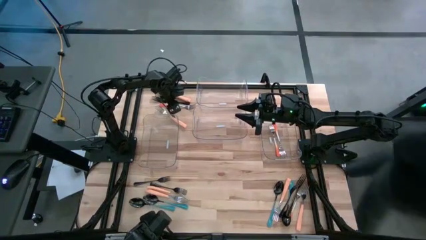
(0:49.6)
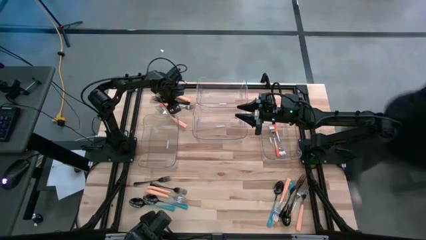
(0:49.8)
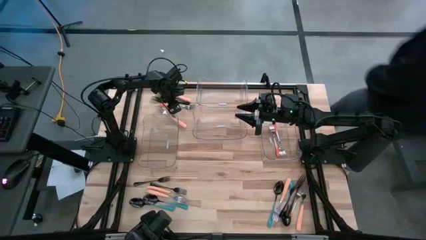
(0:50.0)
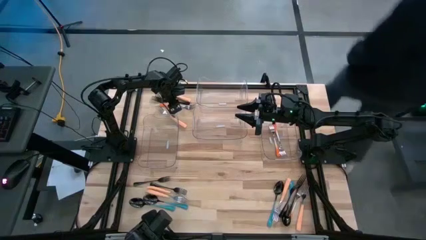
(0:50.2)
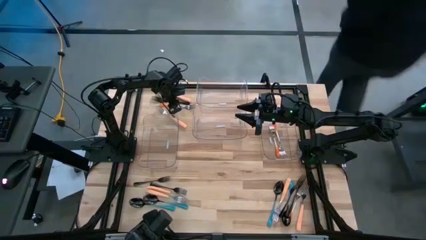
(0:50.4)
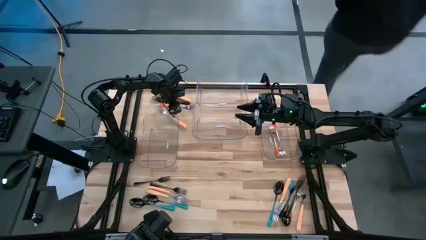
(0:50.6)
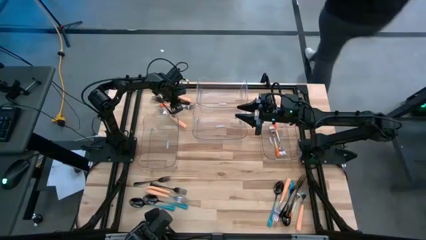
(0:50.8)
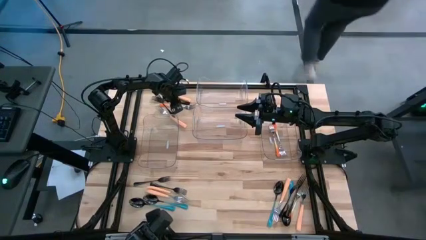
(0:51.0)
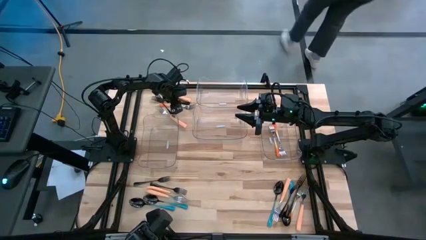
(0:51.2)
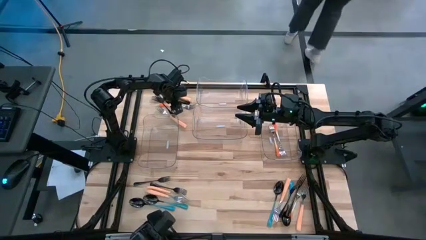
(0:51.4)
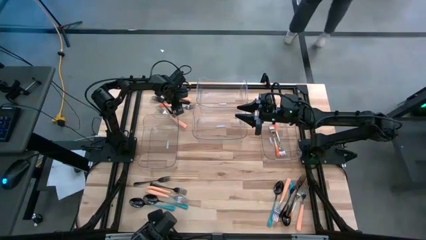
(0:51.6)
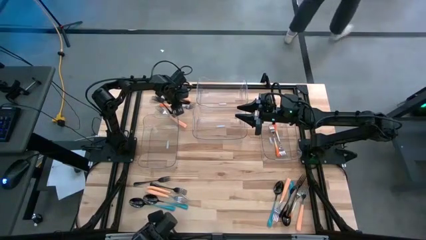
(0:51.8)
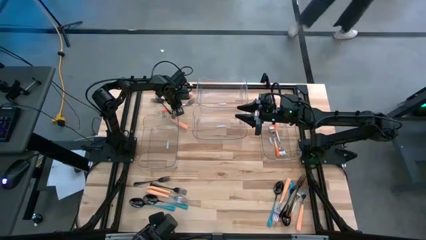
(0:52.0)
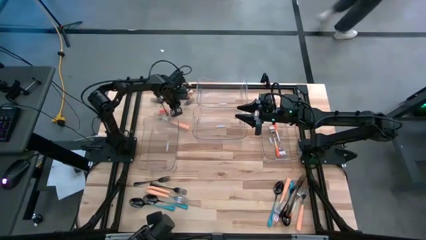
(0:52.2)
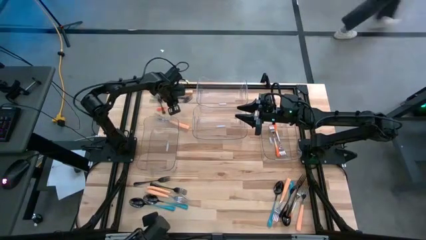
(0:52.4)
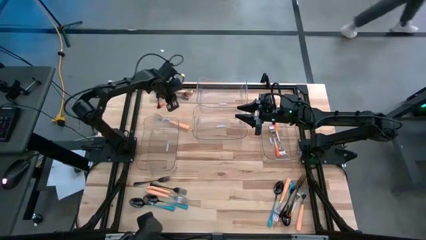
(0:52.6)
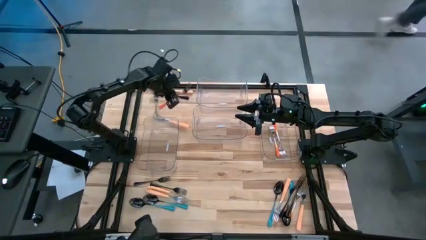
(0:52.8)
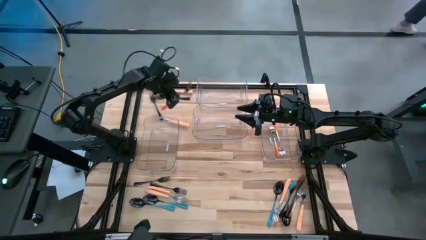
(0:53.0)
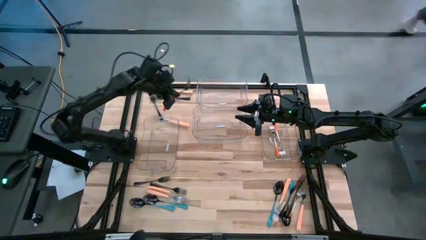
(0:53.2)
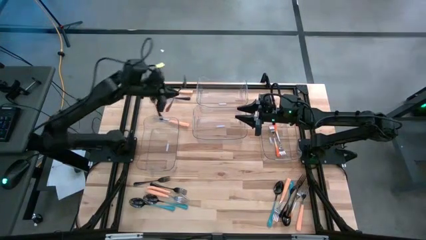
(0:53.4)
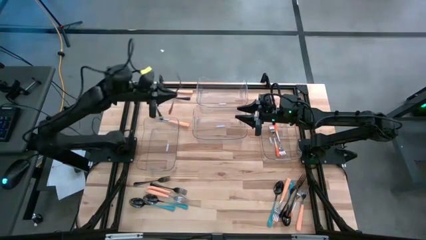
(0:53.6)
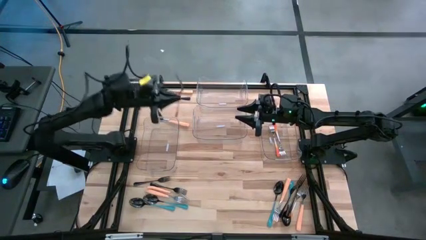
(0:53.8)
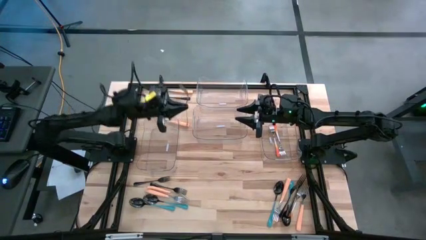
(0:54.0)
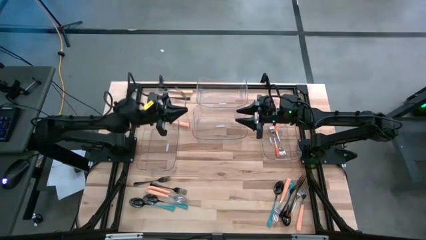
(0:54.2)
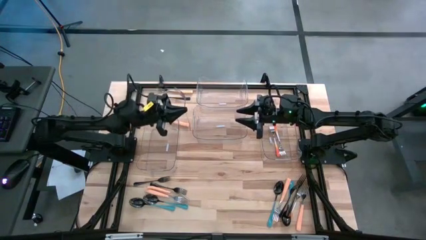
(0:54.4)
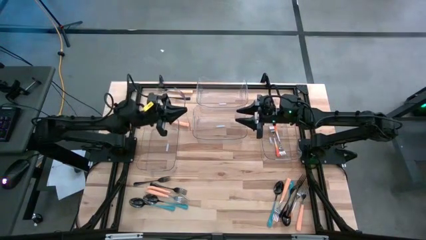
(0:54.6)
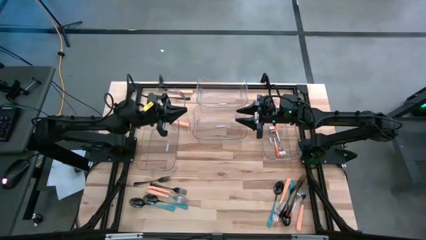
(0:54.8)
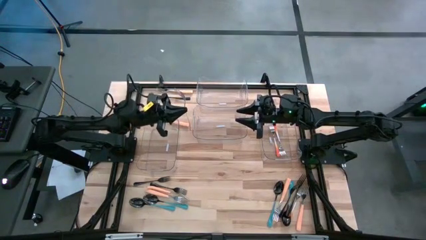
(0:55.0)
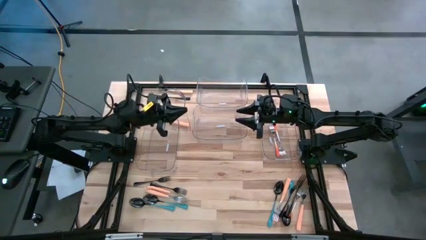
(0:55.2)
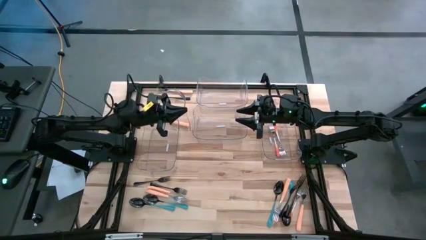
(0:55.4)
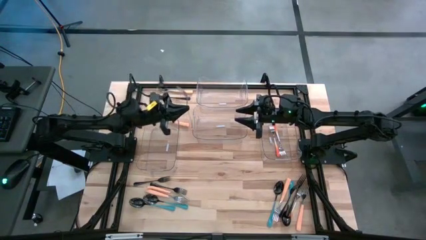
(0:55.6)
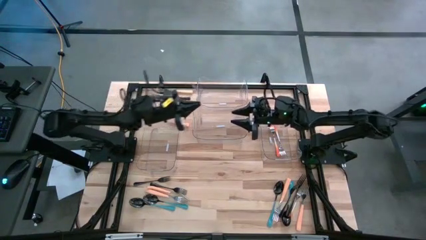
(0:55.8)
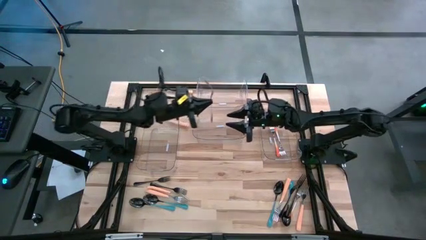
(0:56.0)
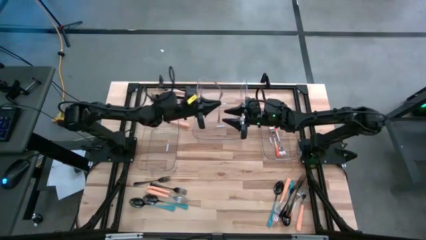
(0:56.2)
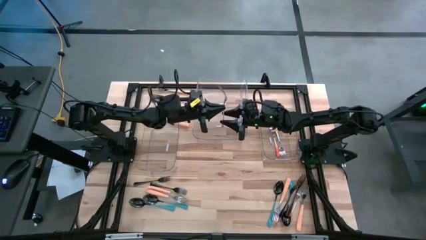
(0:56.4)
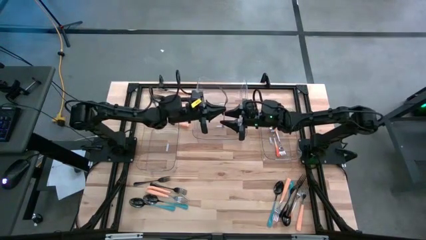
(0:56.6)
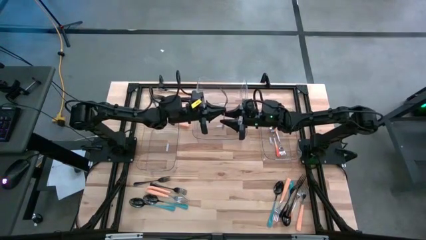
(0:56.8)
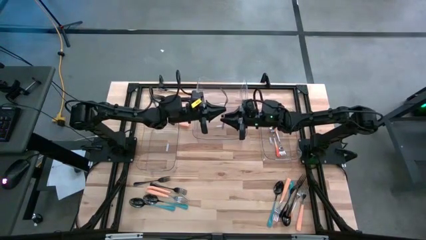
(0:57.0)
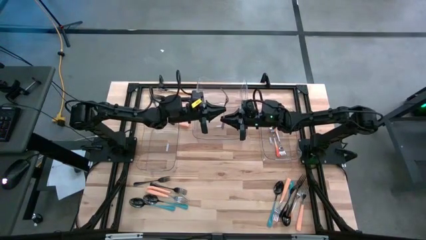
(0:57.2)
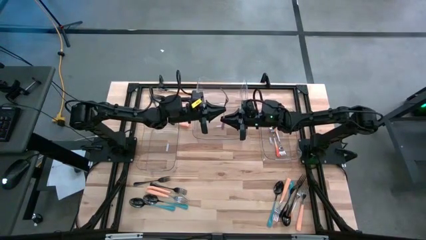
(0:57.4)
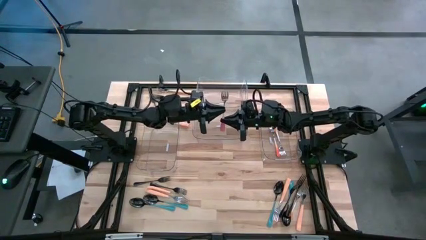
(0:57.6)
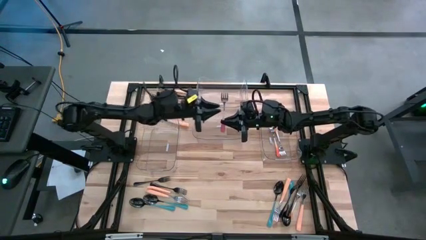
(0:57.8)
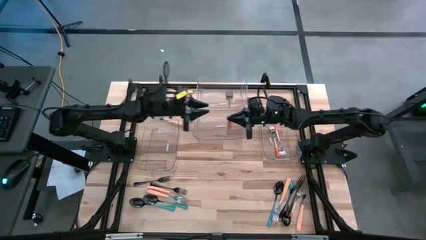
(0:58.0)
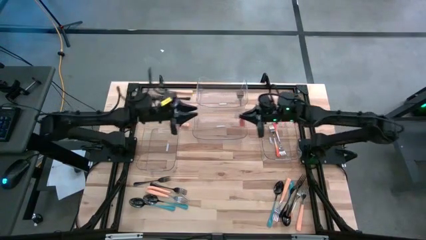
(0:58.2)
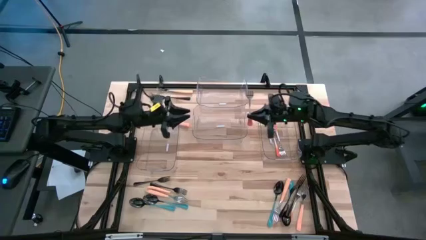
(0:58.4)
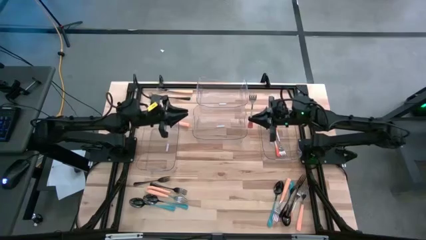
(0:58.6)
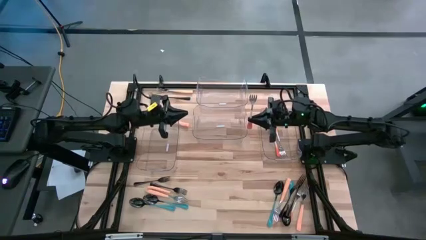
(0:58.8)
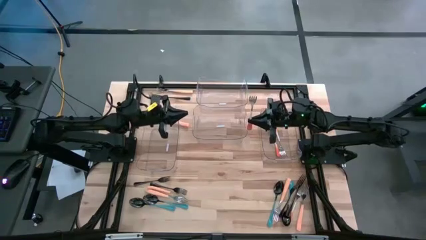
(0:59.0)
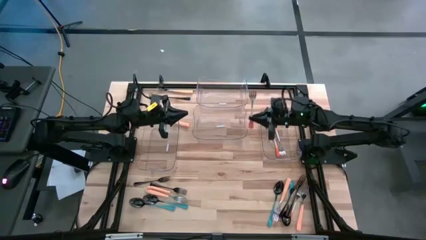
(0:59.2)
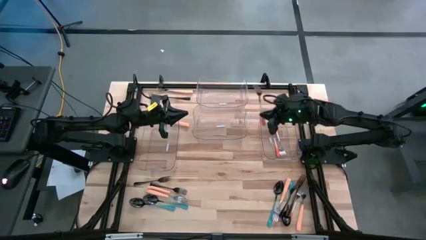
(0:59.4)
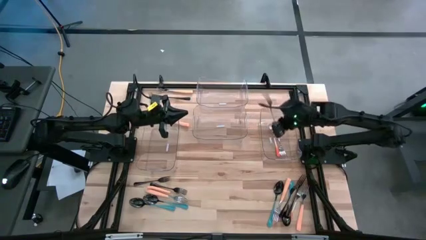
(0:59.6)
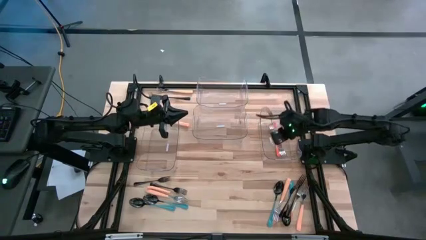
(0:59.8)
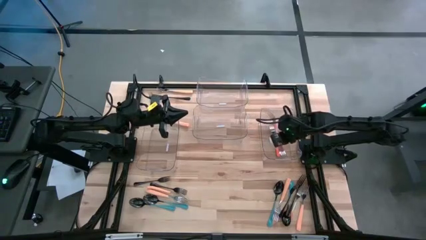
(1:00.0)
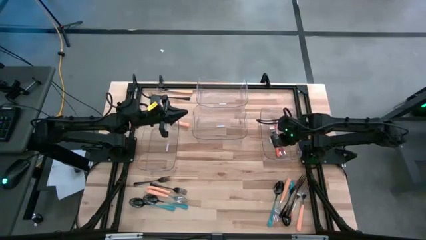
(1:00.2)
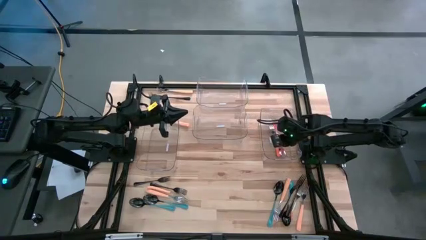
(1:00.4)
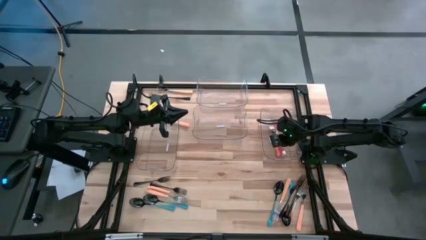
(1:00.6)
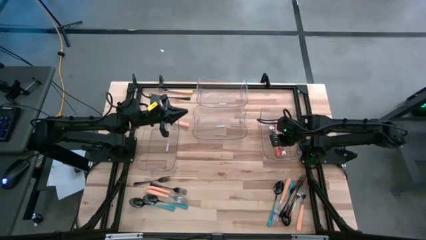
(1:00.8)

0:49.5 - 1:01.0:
Task: Sort silverware by color (type)
Put the orange fork into the bottom right transparent bin
